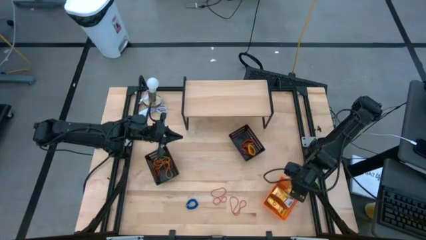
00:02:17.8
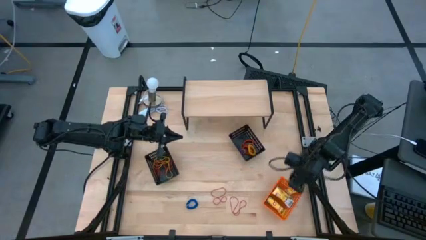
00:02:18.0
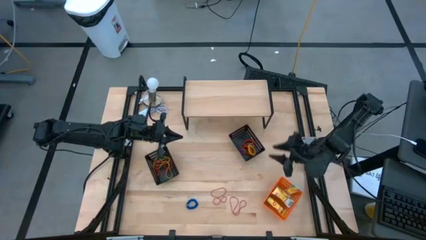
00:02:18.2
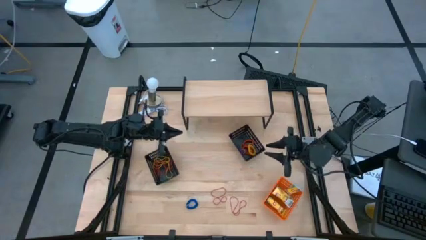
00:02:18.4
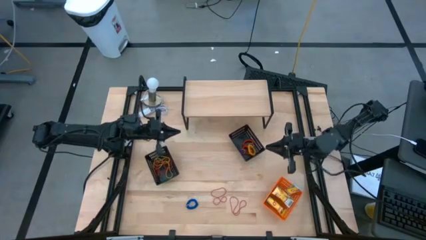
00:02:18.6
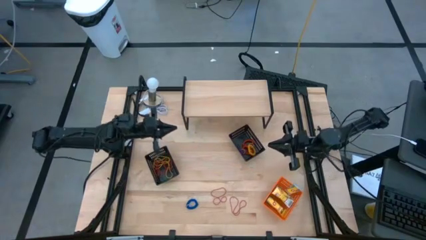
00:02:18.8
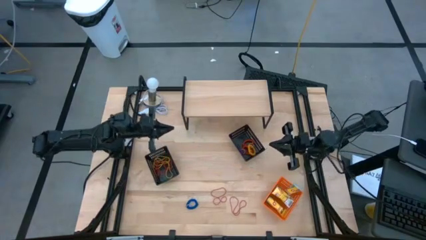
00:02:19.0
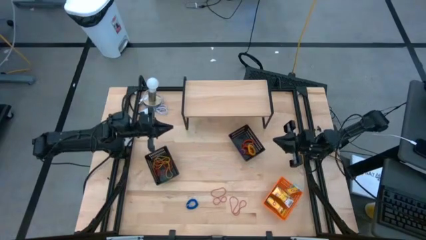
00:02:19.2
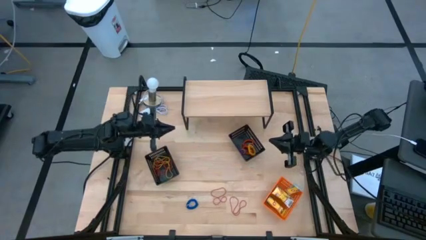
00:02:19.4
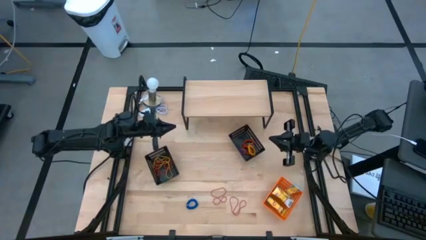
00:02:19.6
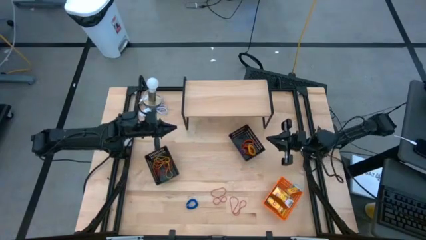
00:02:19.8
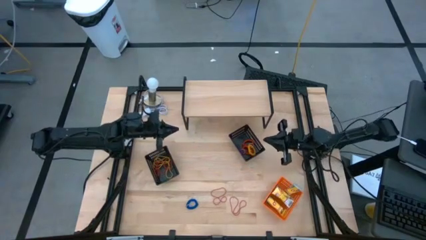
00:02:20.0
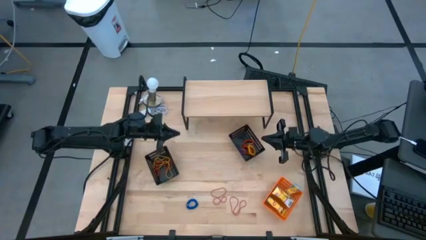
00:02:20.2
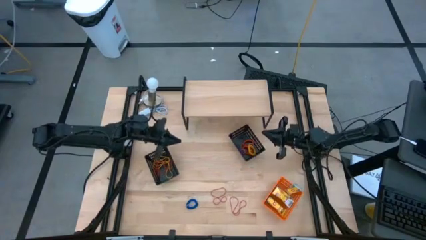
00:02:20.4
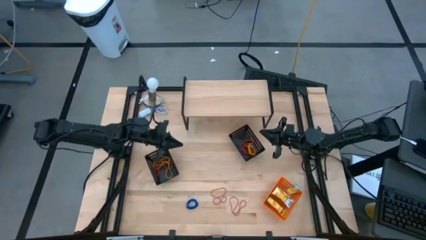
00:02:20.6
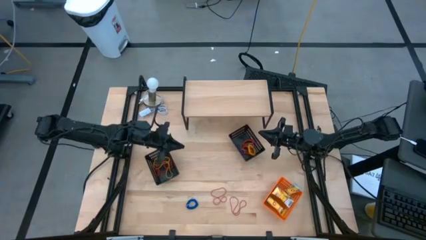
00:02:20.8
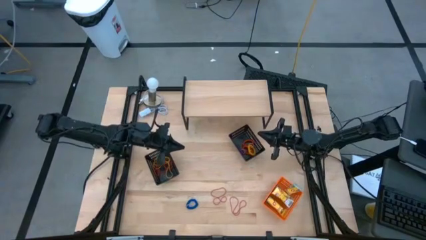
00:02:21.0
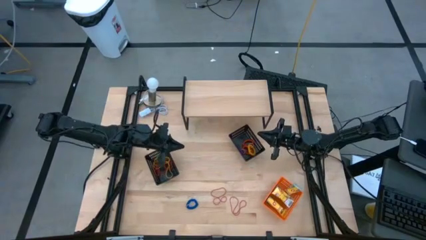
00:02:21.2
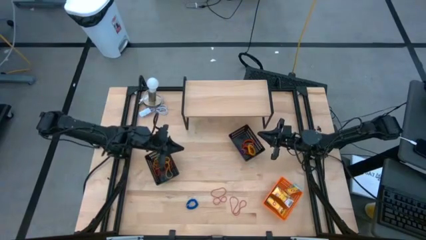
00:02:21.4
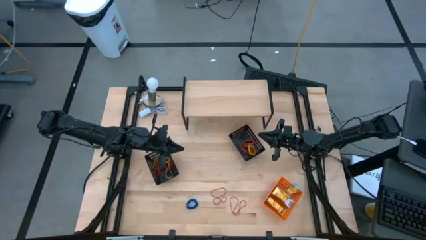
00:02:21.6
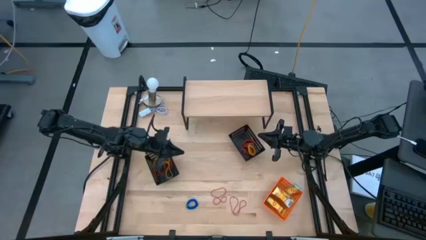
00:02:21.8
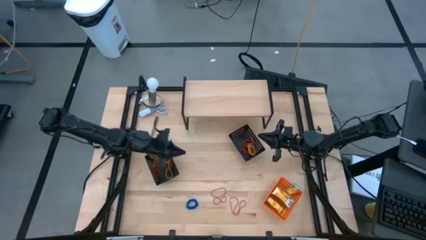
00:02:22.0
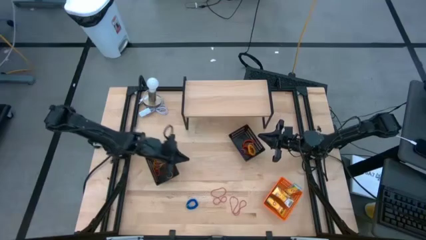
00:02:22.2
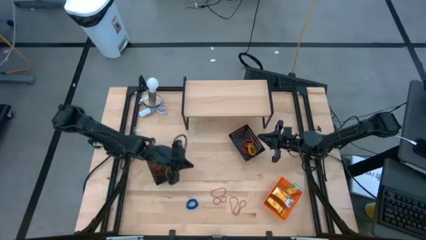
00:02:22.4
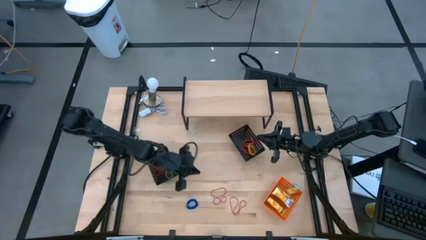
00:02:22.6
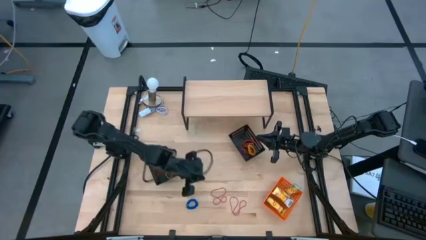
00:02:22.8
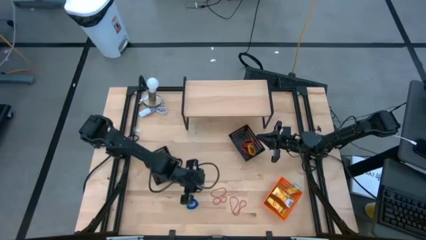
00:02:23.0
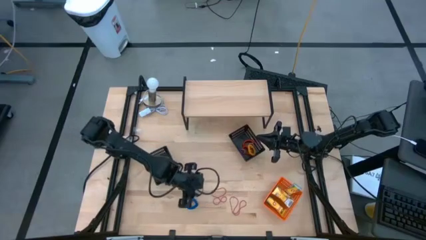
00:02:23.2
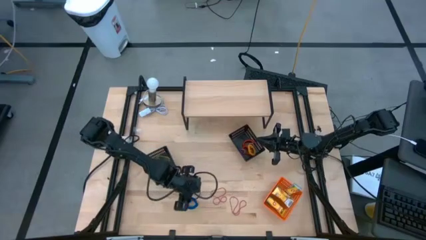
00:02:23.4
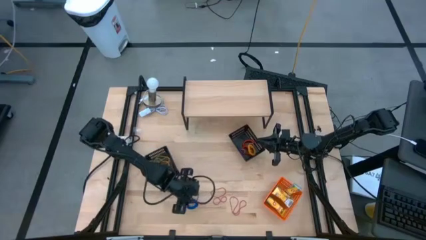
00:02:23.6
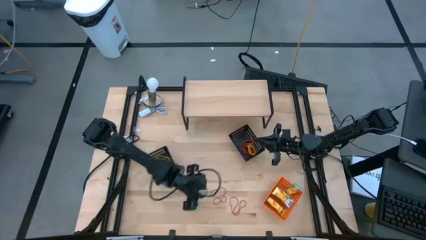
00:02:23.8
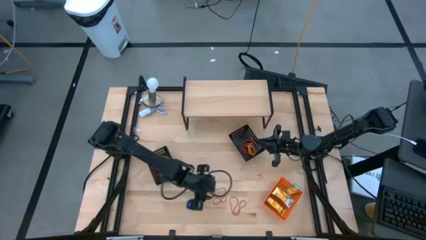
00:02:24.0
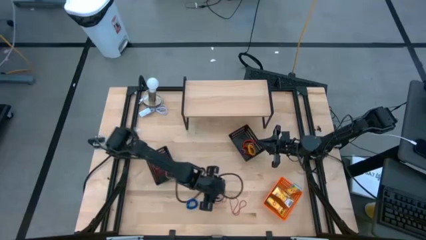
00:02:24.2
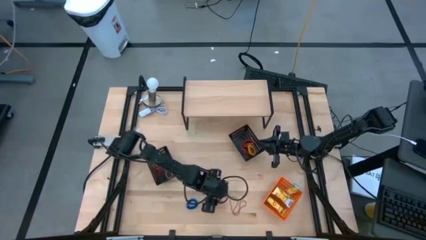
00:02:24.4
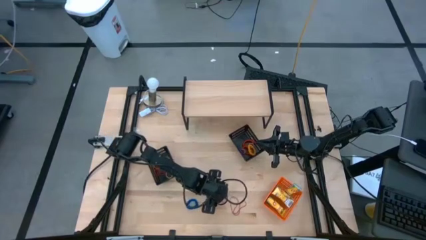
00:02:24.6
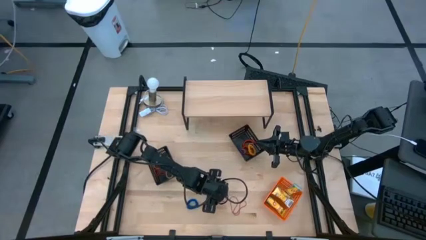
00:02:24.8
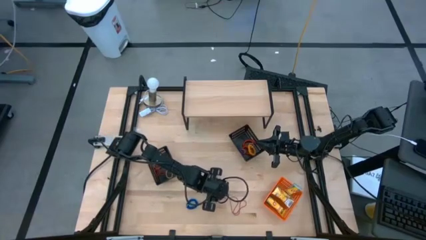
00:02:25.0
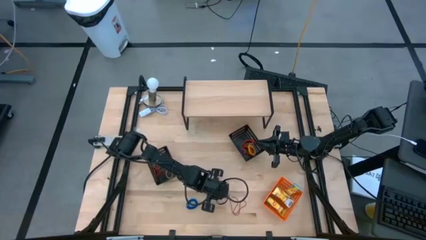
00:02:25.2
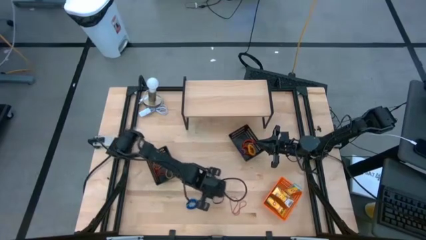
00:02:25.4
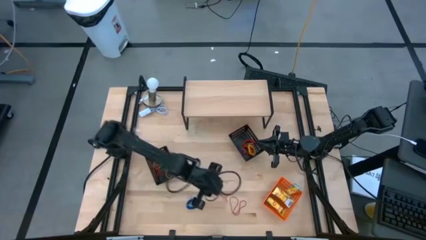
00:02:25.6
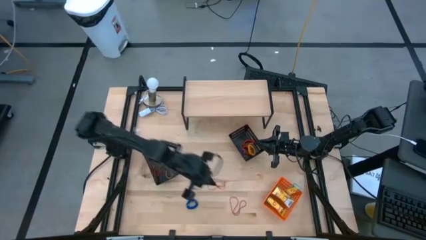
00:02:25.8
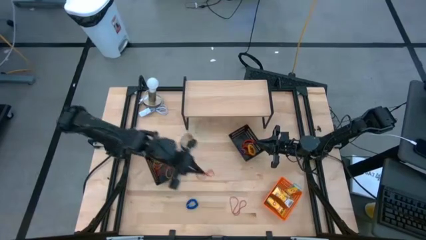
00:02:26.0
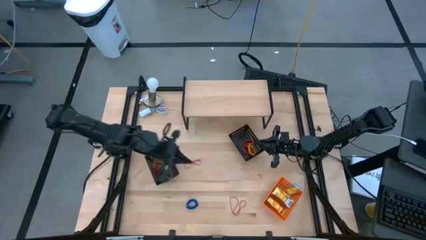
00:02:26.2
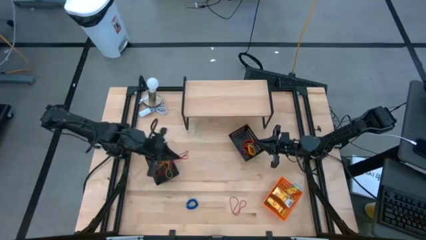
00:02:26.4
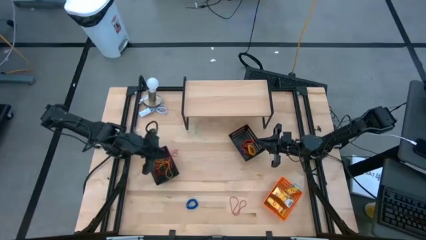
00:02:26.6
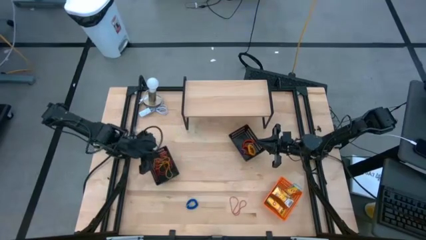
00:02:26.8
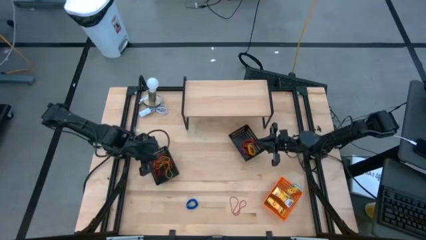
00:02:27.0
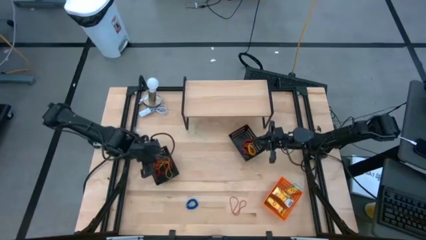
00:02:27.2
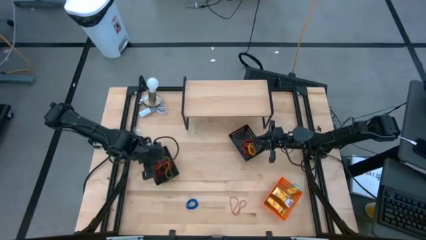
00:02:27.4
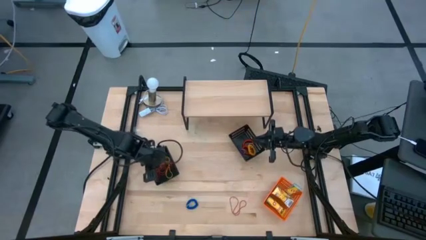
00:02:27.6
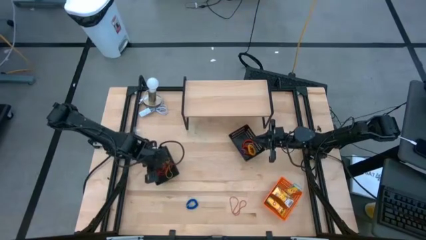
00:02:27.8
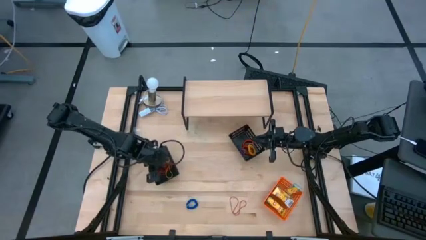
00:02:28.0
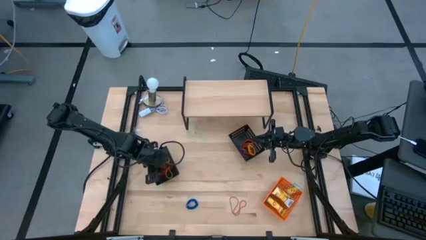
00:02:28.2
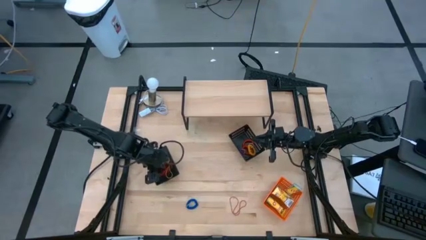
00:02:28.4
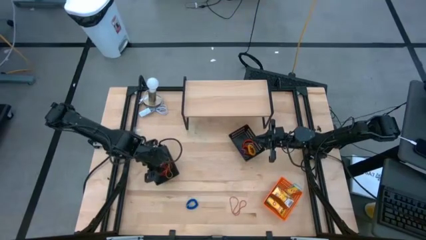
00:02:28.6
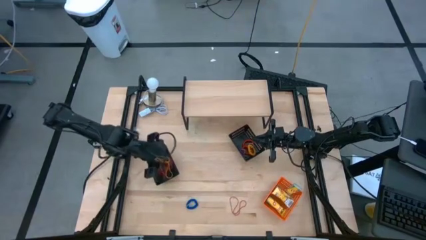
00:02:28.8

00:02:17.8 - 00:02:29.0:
Task: Pick & Place Office Desk Supplies
Put the red rubber band into the left black bin
